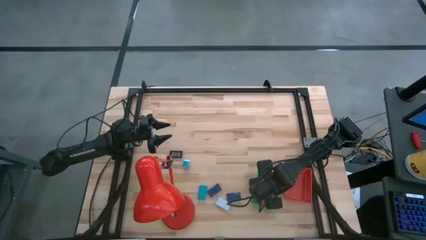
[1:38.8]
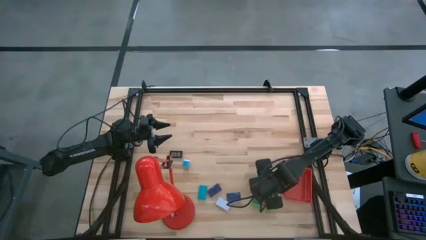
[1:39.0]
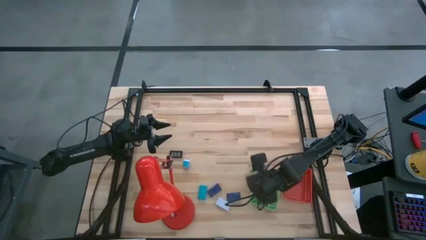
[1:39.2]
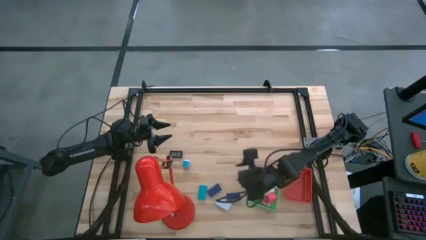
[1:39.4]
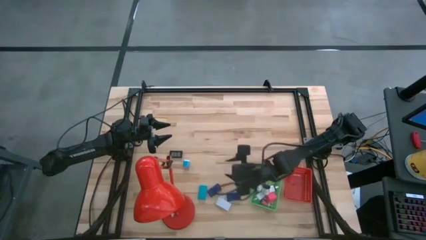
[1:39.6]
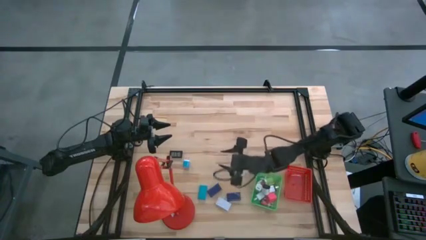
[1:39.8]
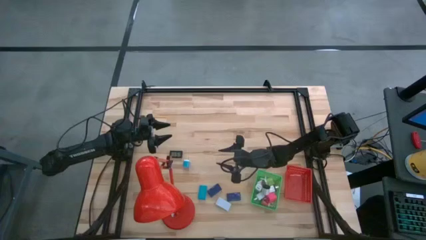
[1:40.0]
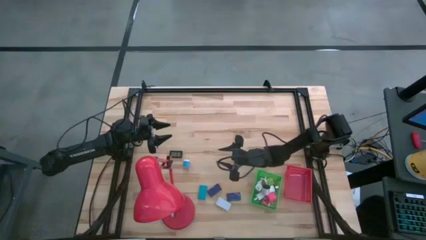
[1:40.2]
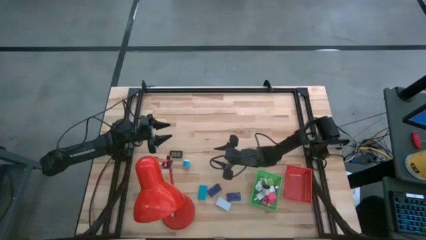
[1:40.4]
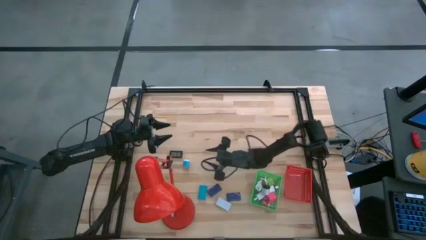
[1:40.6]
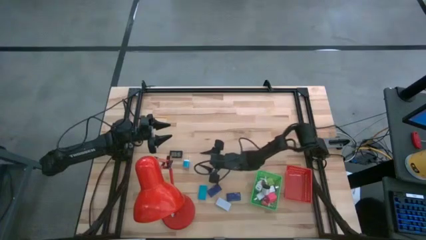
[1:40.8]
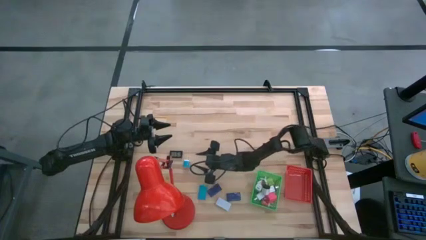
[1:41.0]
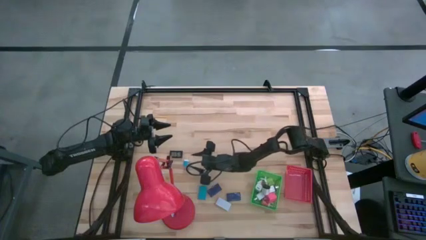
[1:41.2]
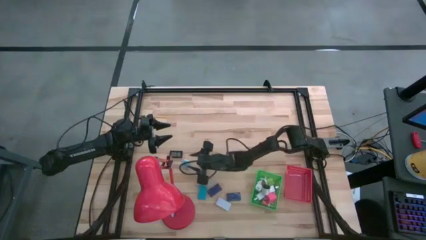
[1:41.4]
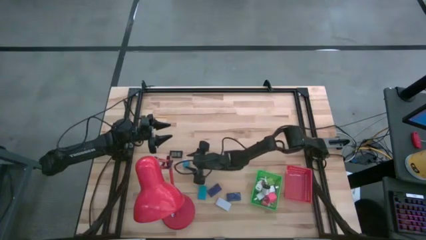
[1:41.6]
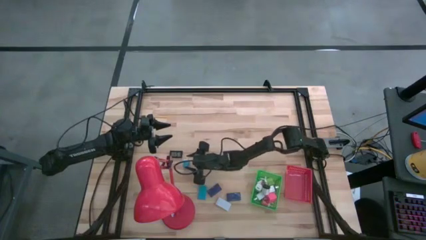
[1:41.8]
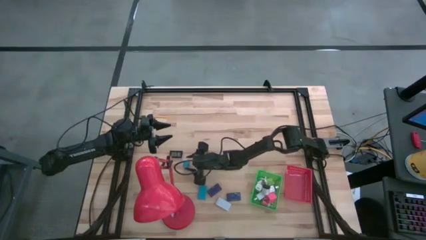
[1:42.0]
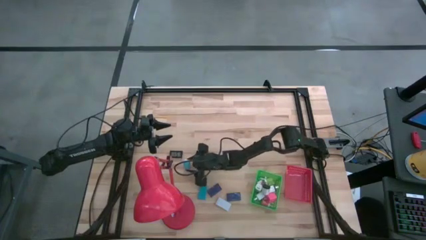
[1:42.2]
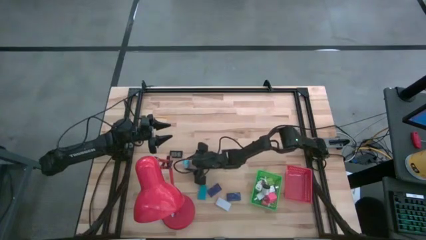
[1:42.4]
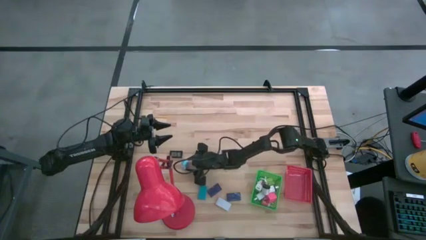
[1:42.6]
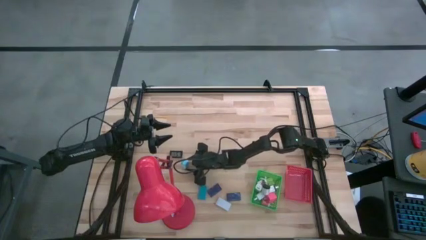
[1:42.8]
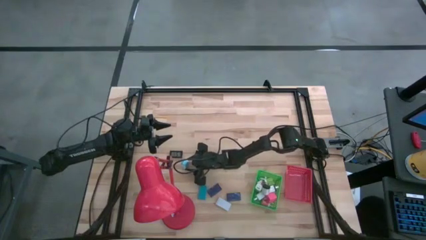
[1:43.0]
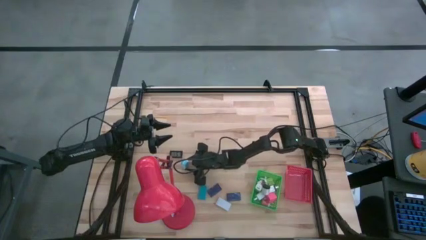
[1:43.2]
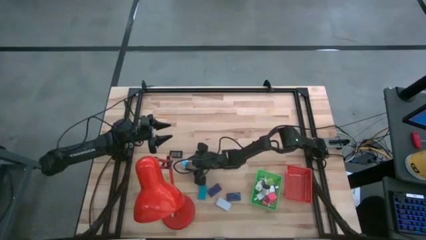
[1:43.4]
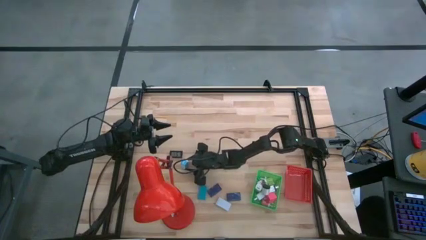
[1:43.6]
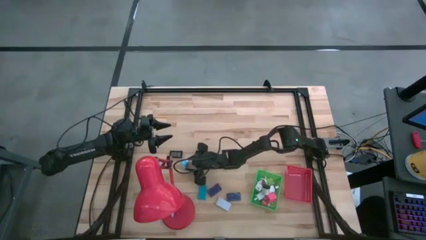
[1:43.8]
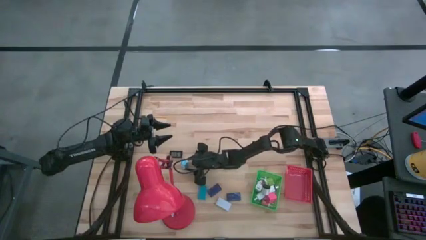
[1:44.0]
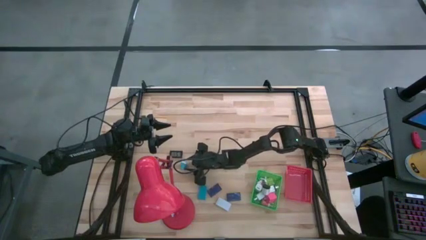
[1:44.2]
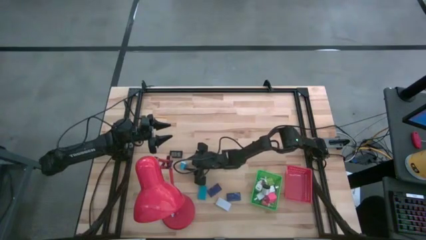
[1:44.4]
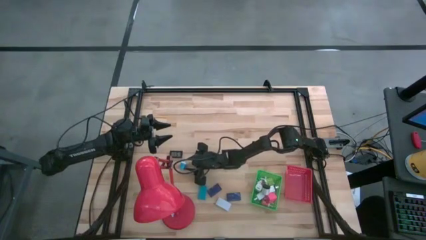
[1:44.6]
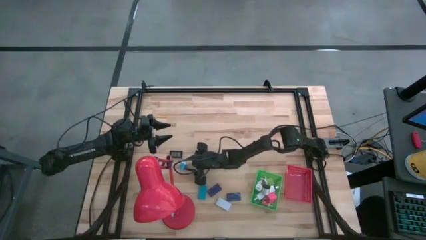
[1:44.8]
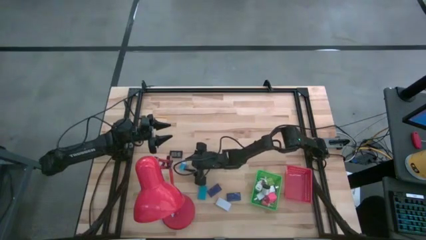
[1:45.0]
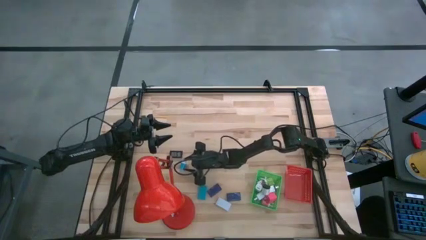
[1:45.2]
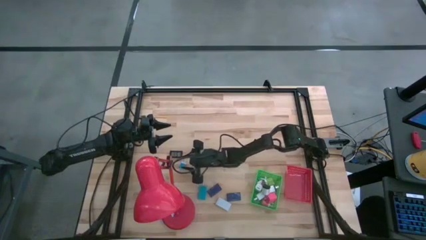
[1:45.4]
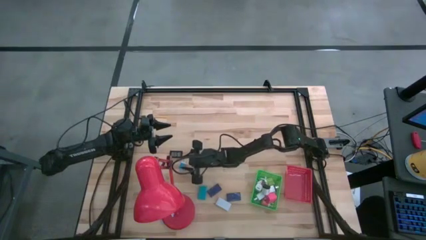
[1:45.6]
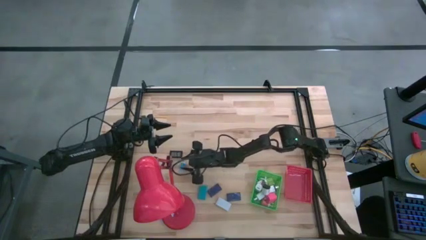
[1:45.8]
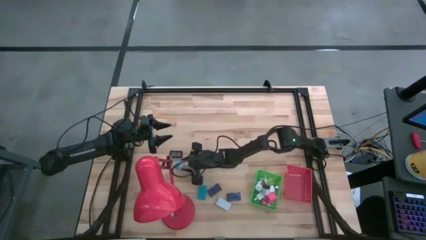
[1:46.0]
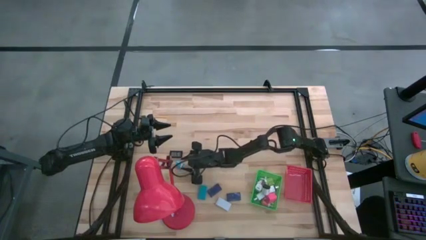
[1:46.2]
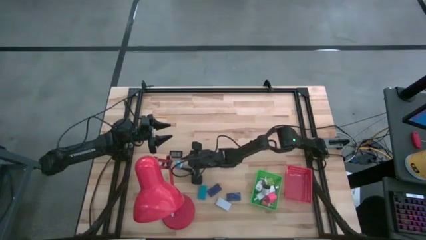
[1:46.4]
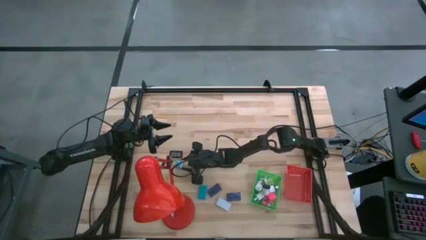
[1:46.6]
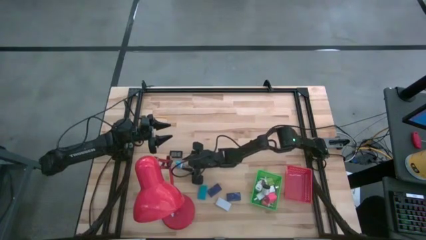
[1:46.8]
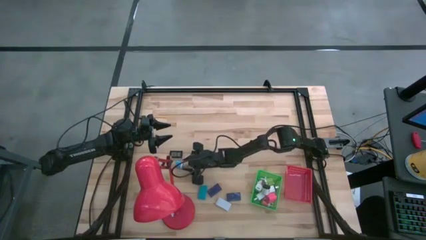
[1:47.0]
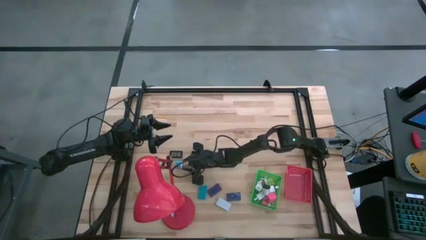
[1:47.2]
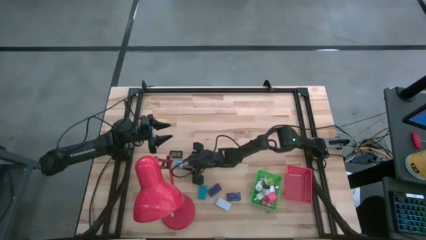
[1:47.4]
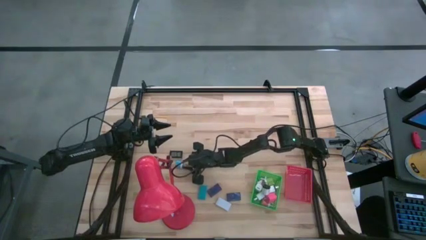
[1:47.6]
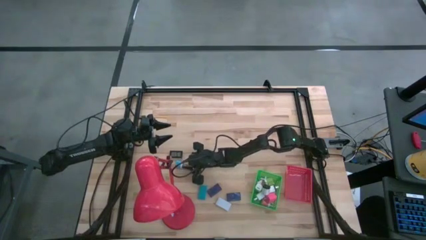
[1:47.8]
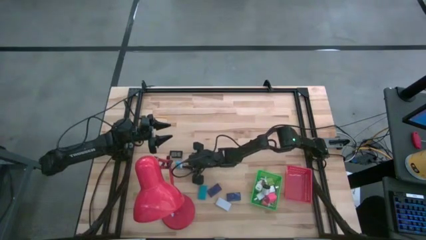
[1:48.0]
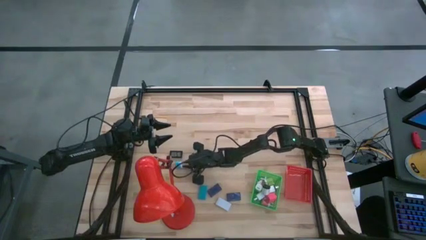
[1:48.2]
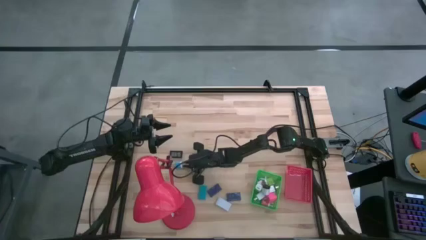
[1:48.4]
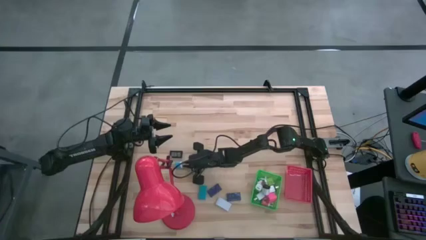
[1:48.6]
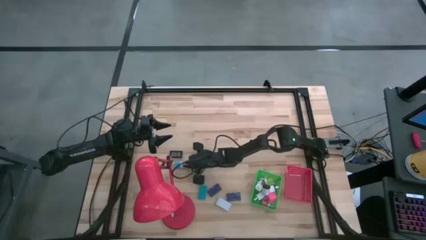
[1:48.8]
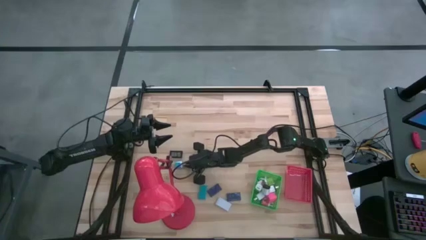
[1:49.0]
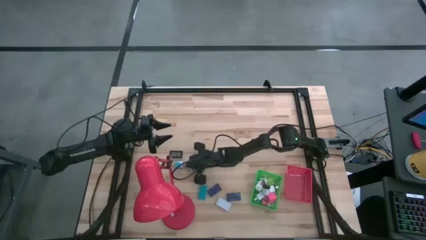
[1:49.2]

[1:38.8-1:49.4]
Task: Pick & Place Office items
Put the blue charger adapter into the green basket

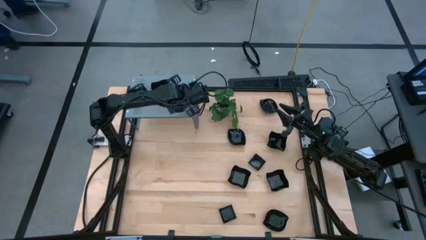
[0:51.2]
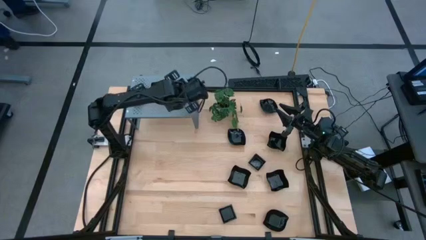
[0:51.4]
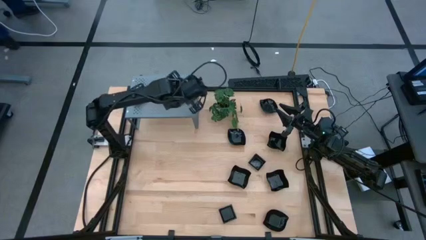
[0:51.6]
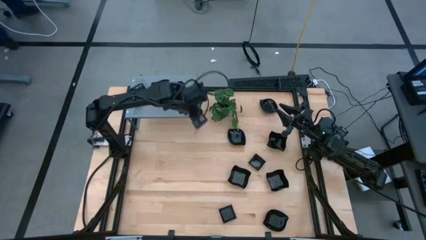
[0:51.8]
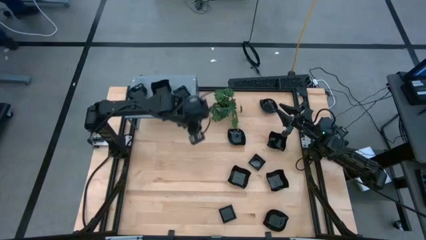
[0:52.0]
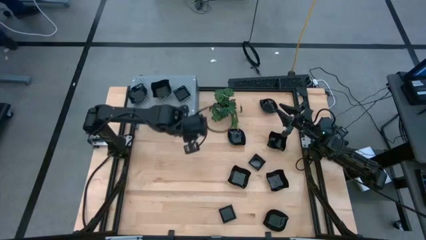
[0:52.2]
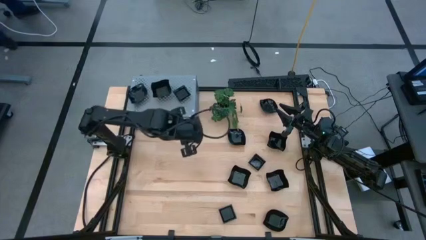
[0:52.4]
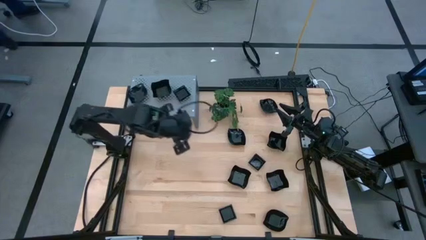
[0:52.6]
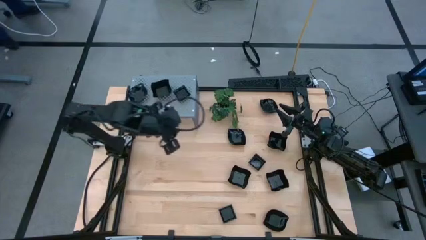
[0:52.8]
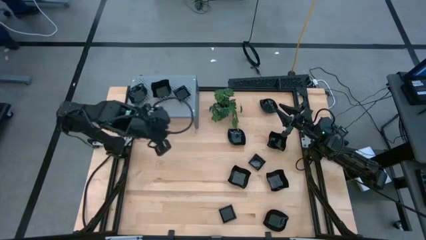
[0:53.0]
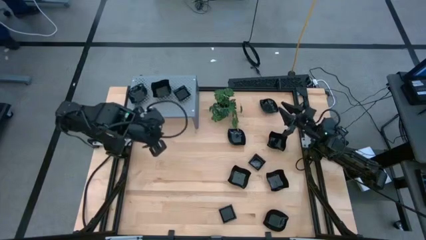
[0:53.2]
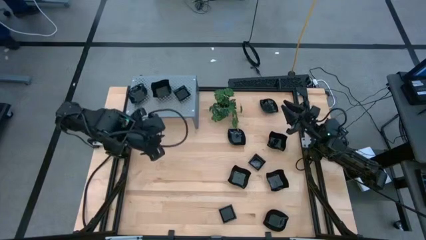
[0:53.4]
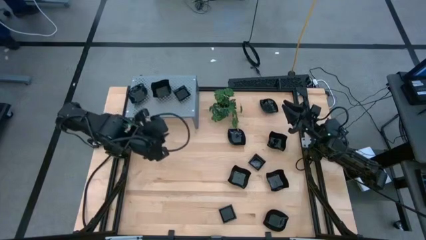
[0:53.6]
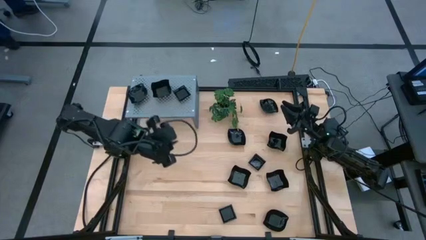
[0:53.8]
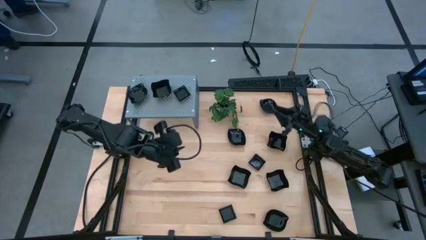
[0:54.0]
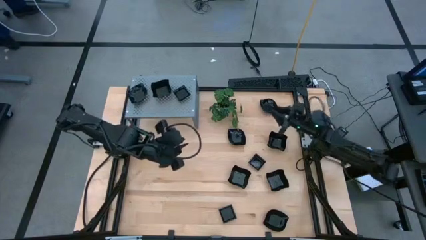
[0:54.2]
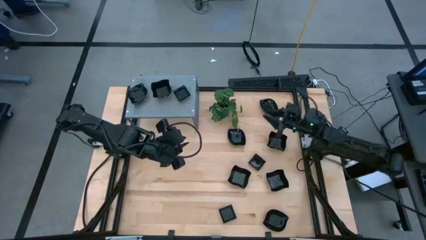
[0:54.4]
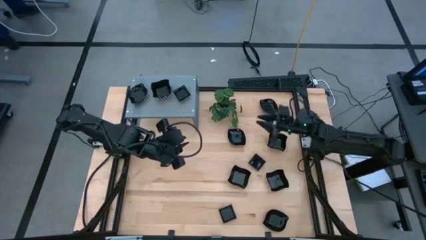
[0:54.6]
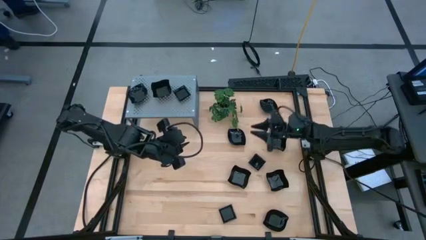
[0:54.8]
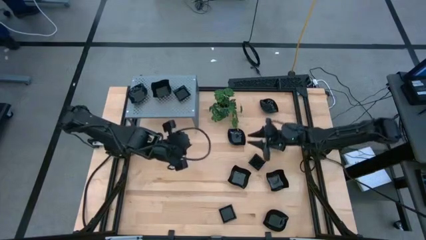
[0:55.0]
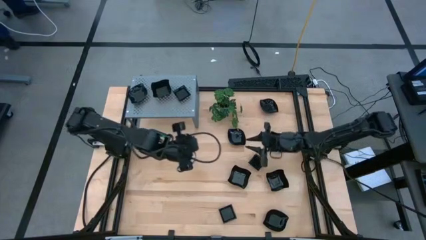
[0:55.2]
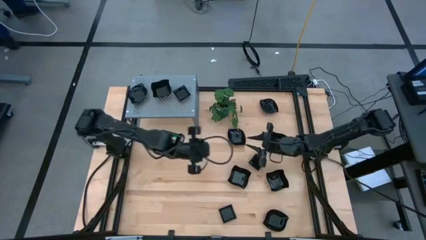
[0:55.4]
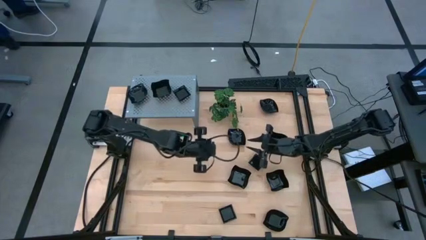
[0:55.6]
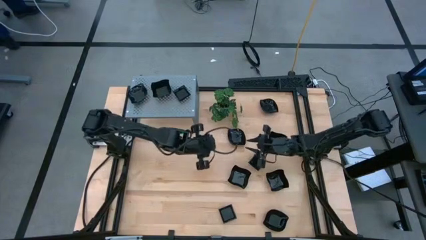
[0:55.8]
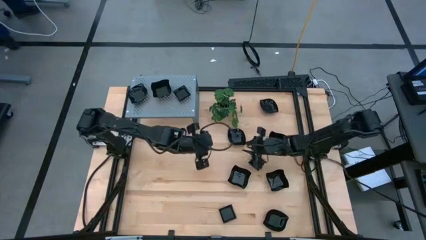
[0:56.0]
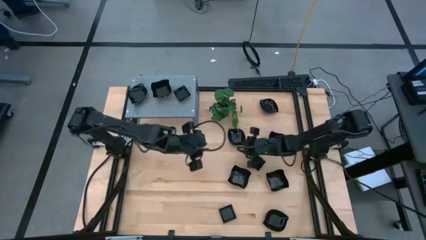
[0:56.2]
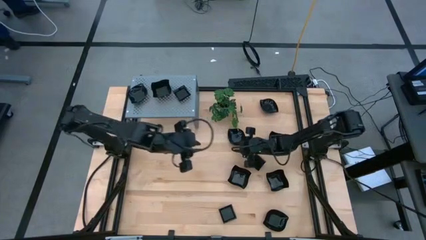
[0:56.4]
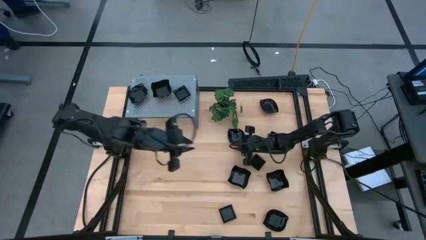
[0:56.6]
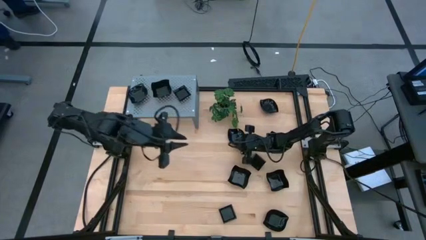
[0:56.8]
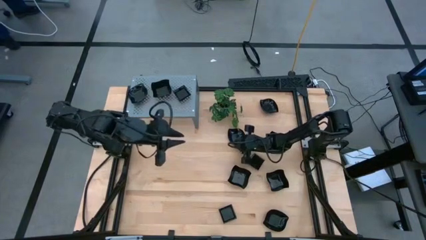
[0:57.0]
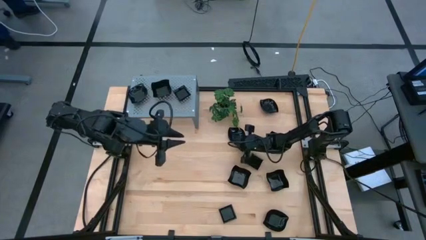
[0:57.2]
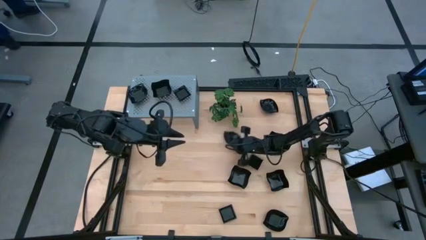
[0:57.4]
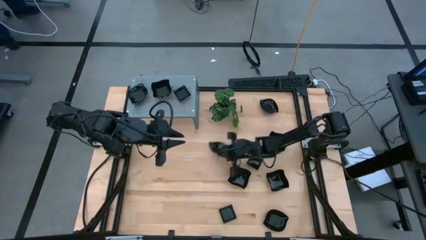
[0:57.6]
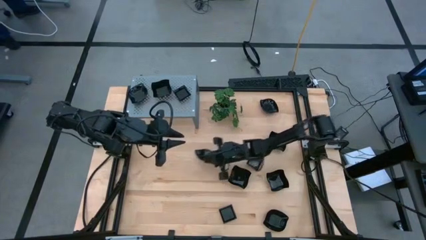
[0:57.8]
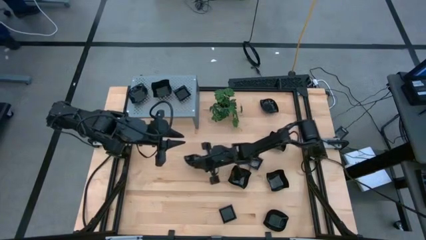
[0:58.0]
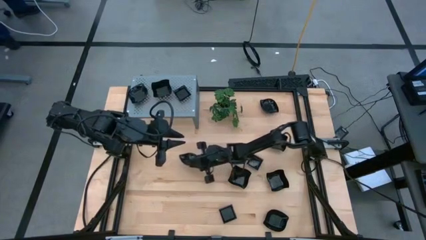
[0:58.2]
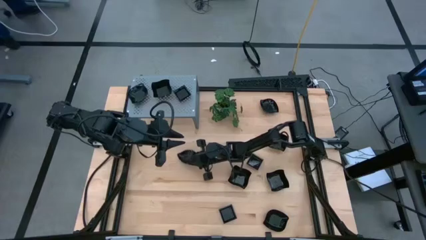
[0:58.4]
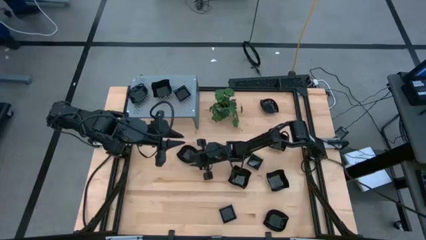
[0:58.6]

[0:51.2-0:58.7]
Task: Pick & Place Mini shaped plates
Move the black leaf shaped plate to the center of the table
